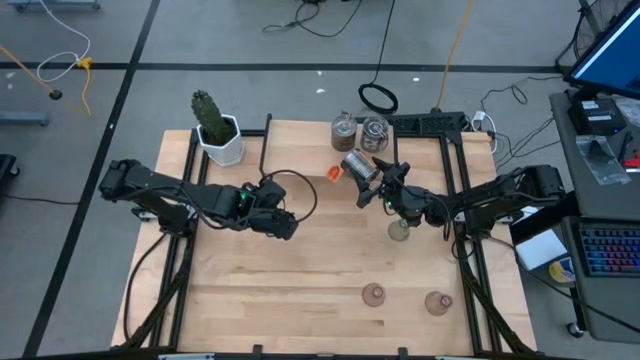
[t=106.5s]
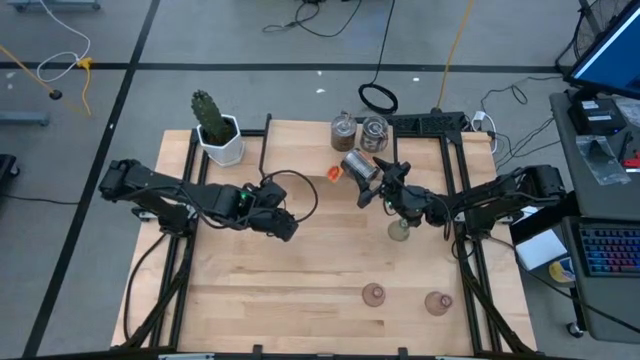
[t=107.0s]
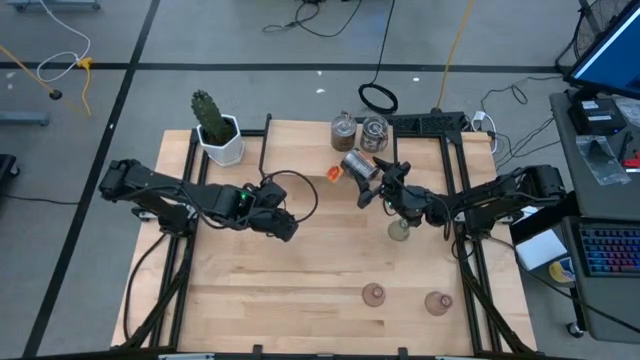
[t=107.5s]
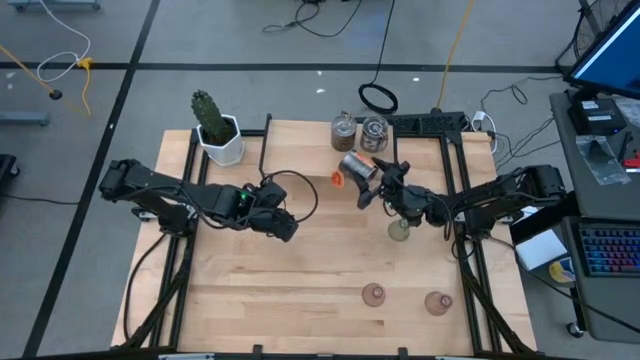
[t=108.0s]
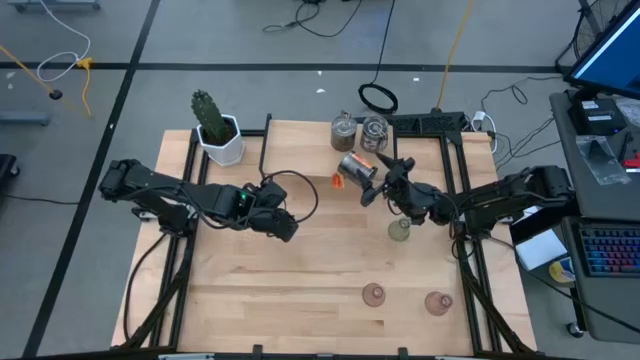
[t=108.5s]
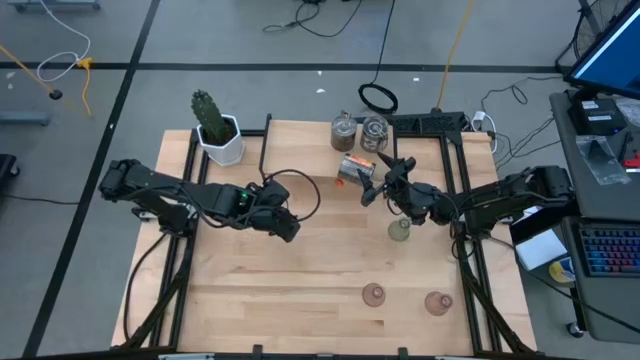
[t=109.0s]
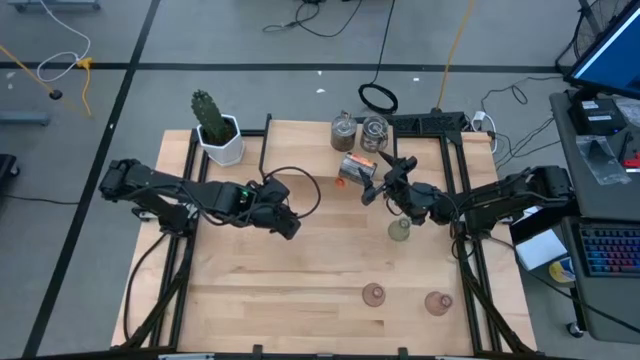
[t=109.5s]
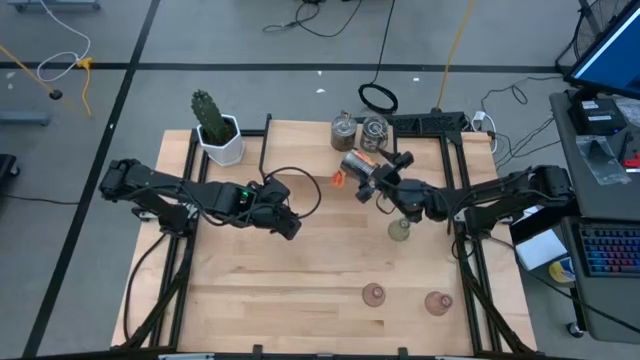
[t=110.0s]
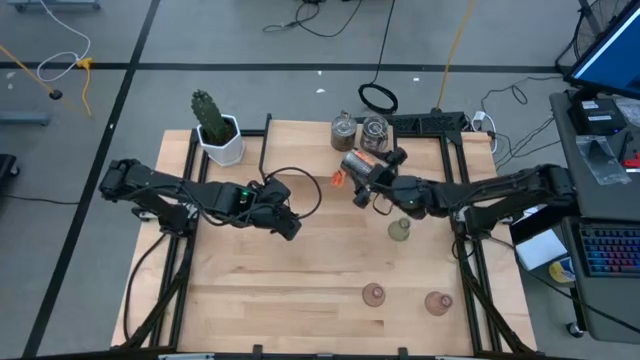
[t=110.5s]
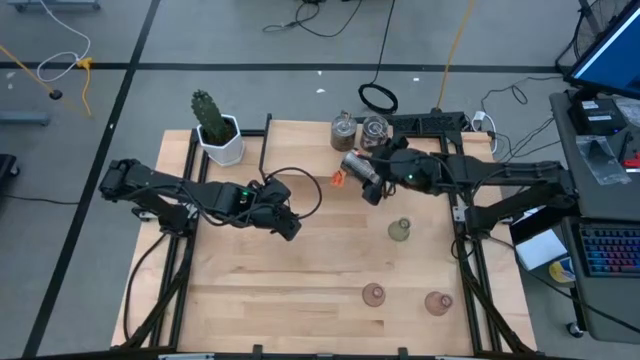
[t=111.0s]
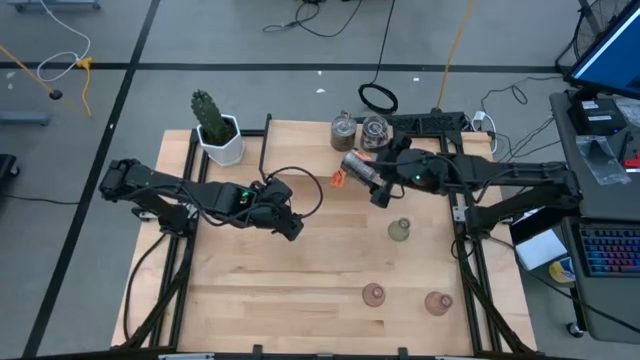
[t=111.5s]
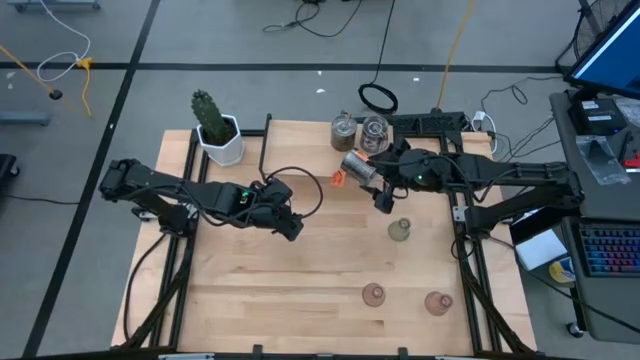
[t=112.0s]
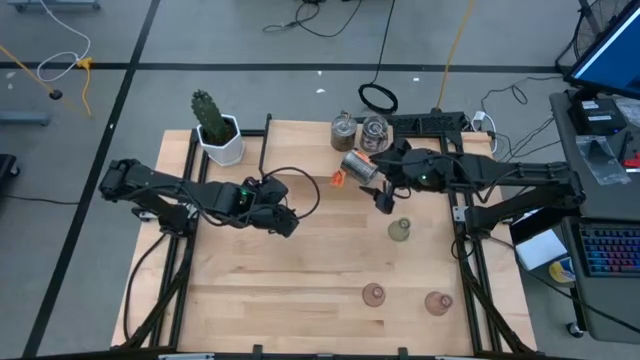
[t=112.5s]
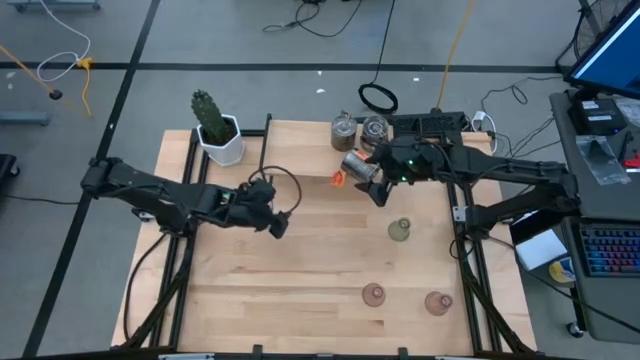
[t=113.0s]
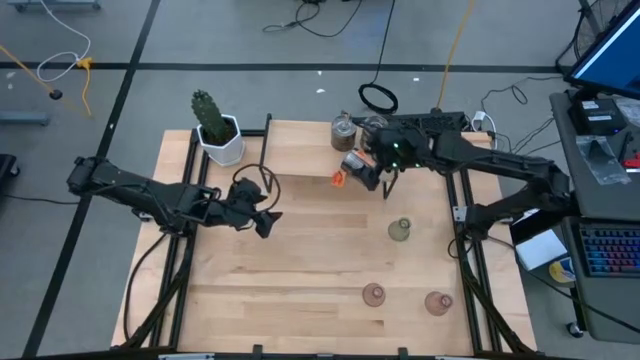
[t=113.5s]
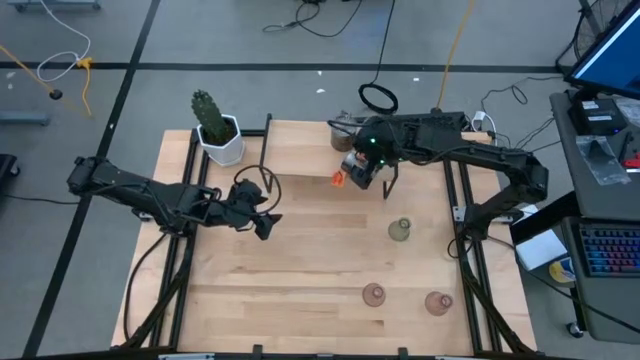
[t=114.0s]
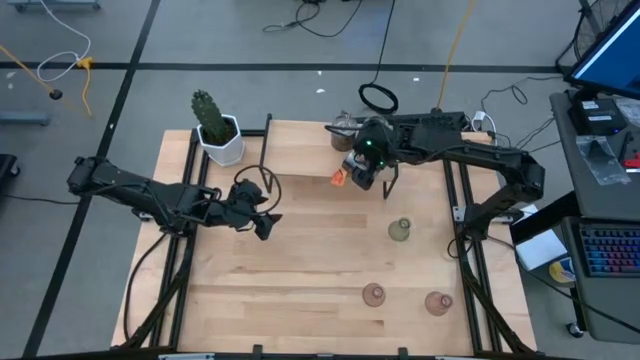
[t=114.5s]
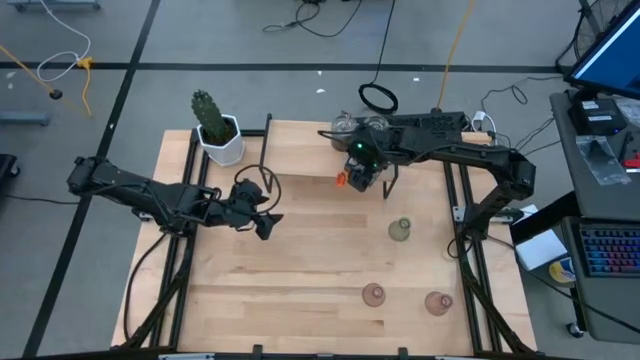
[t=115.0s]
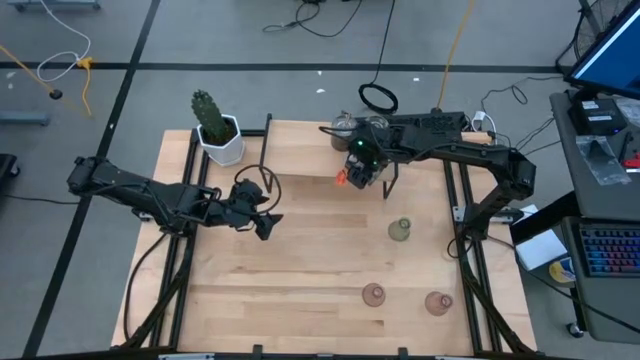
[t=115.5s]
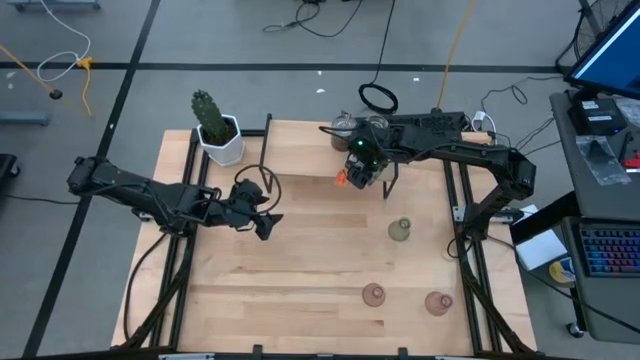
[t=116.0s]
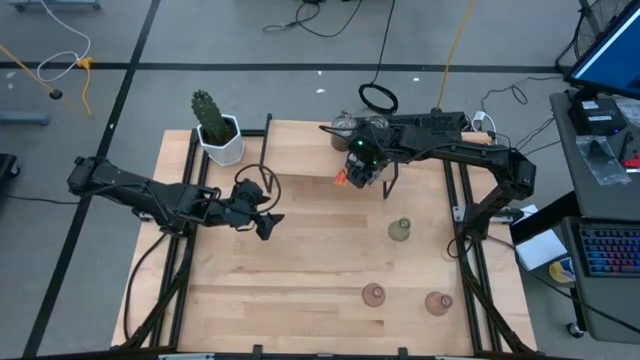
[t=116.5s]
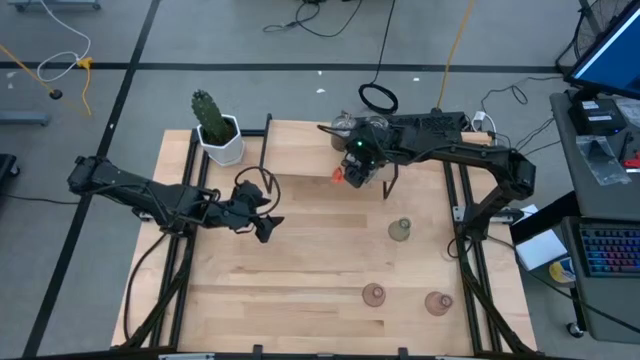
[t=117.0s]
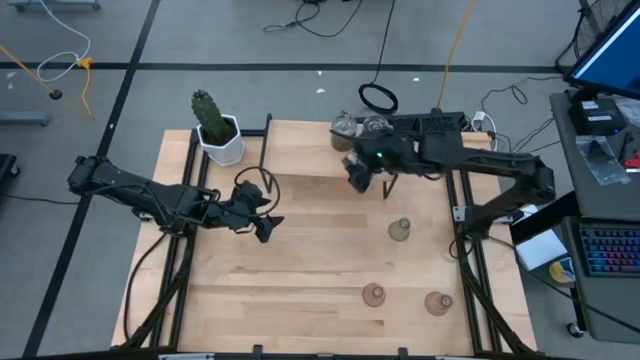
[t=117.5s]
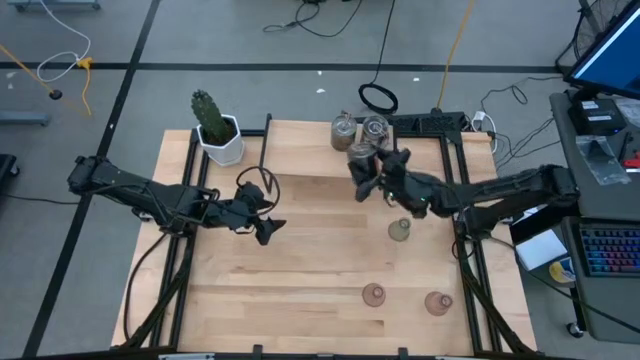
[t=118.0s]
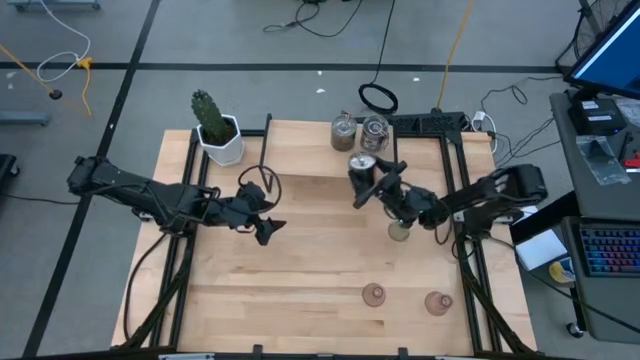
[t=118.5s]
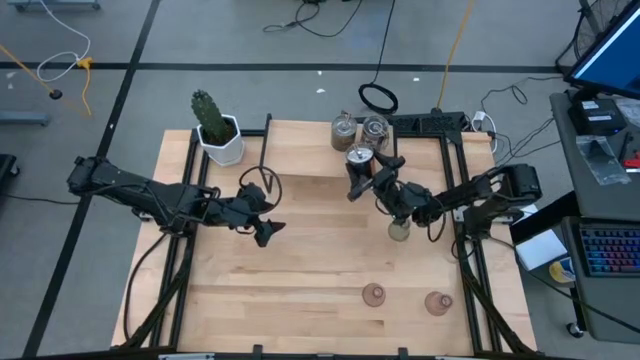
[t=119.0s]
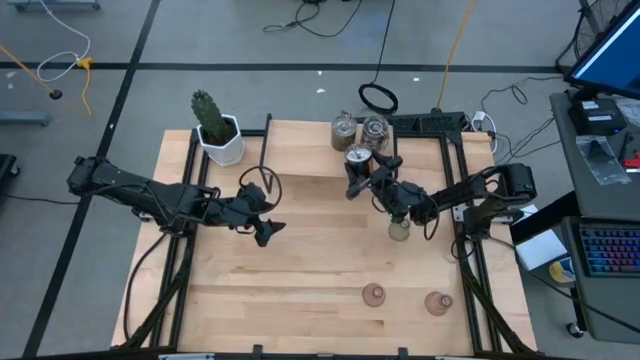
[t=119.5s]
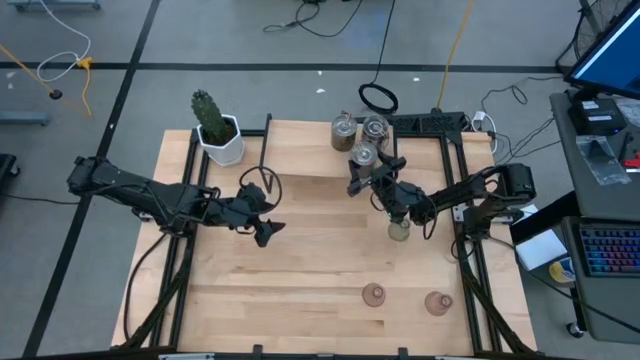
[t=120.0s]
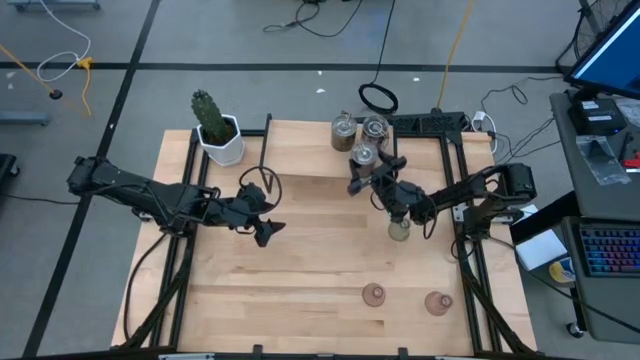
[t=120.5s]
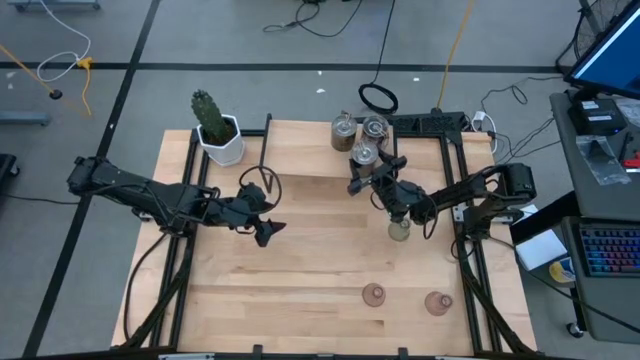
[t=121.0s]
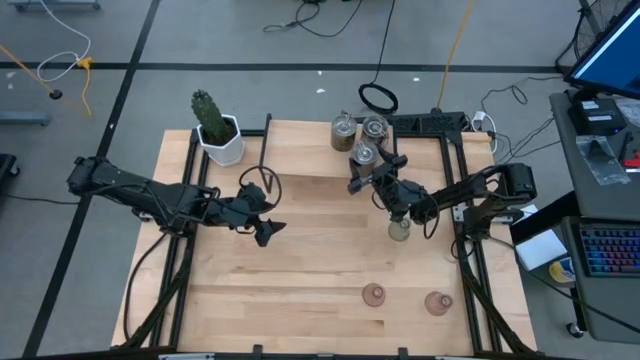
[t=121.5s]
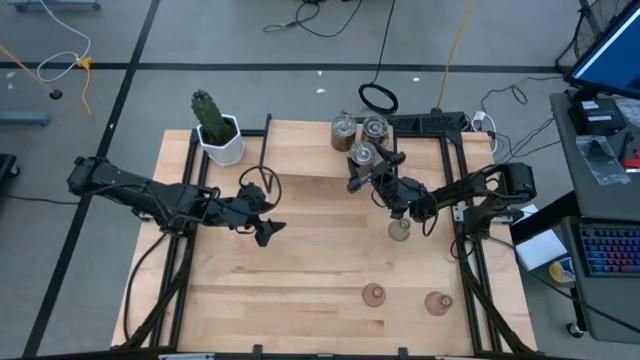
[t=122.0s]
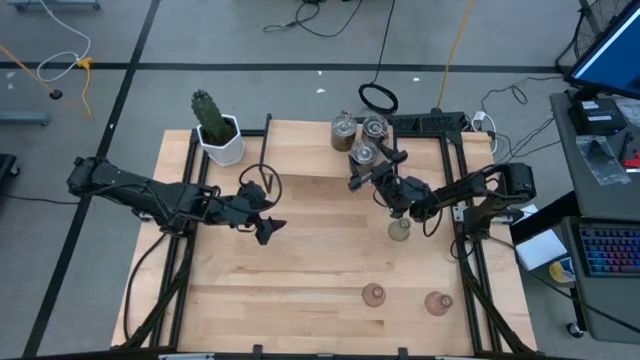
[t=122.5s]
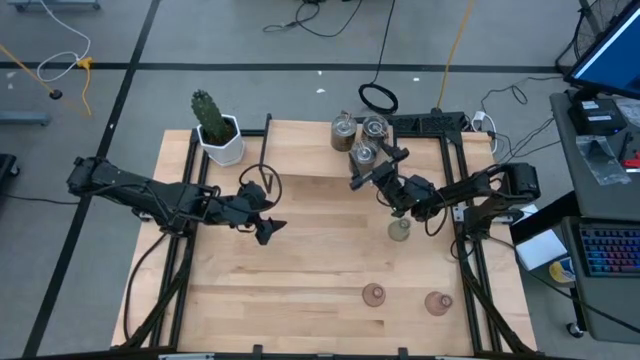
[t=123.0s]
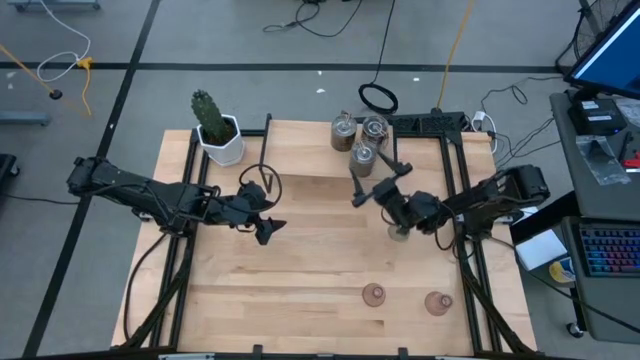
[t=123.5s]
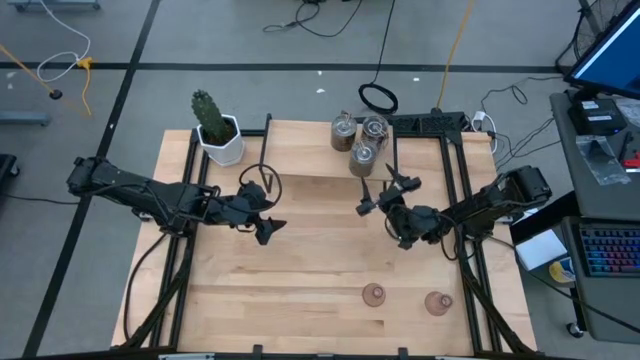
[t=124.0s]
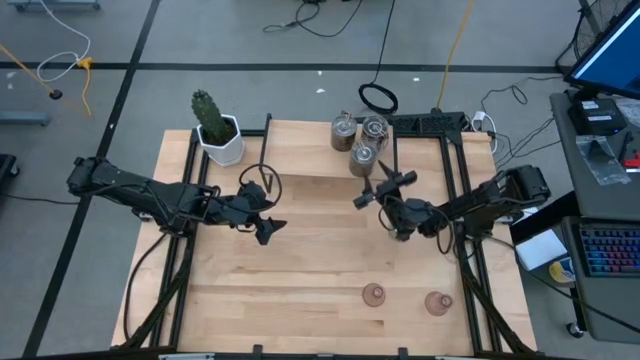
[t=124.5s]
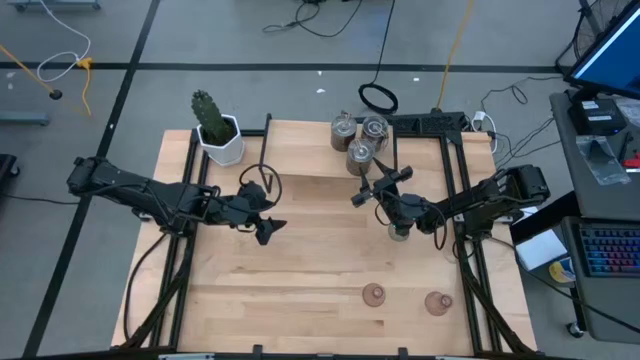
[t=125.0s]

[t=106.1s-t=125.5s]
Task: Pick & Place candle stick holders
Put the silver scented candle on the shelf

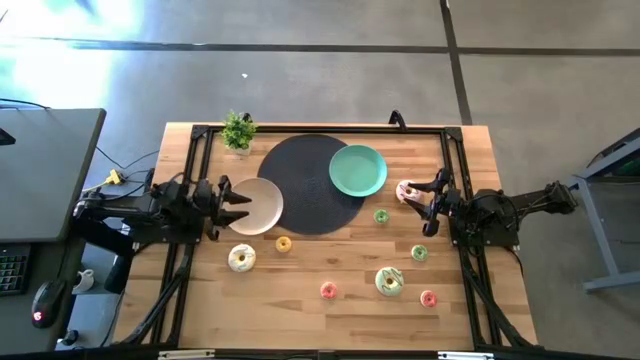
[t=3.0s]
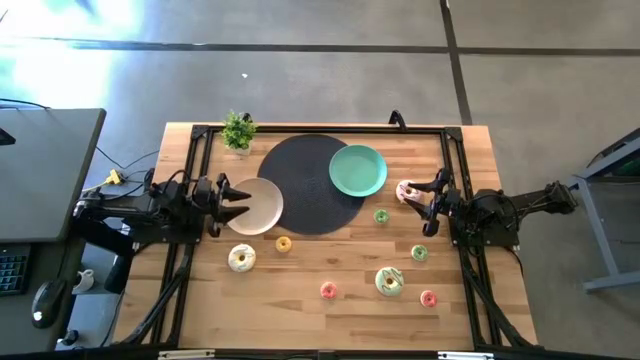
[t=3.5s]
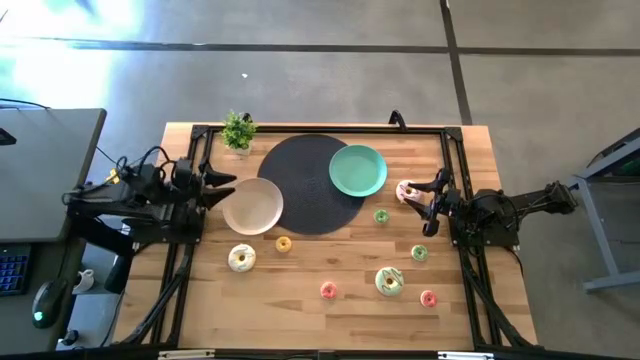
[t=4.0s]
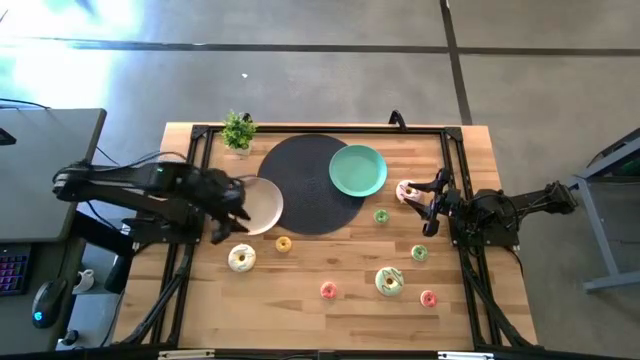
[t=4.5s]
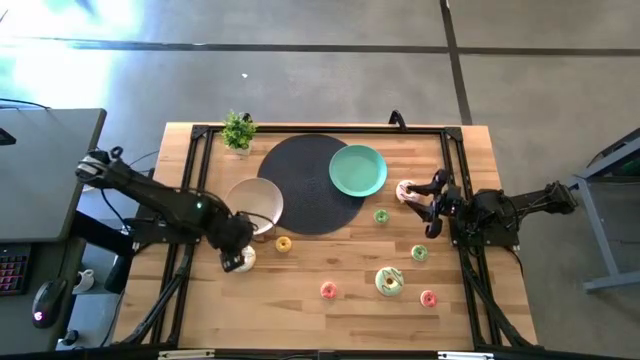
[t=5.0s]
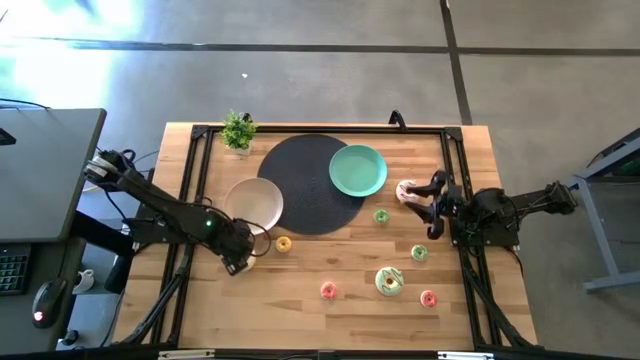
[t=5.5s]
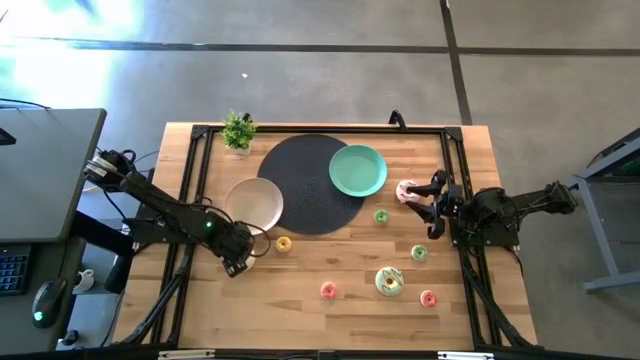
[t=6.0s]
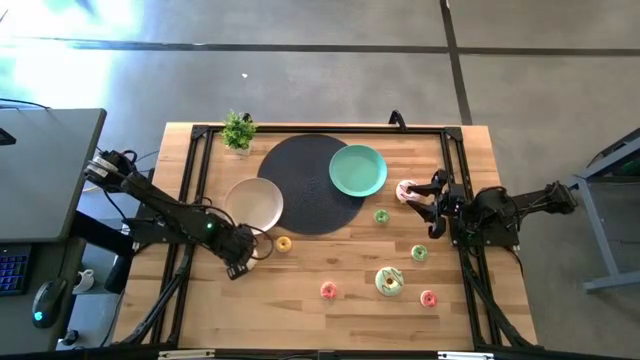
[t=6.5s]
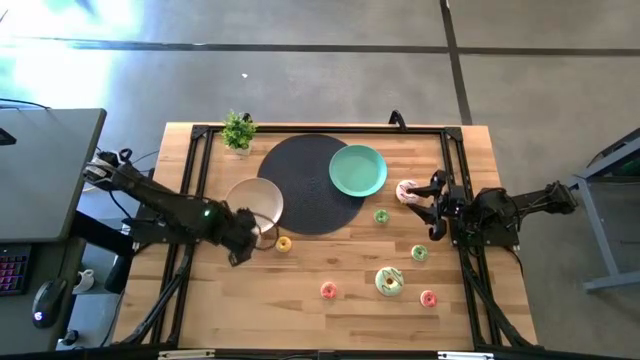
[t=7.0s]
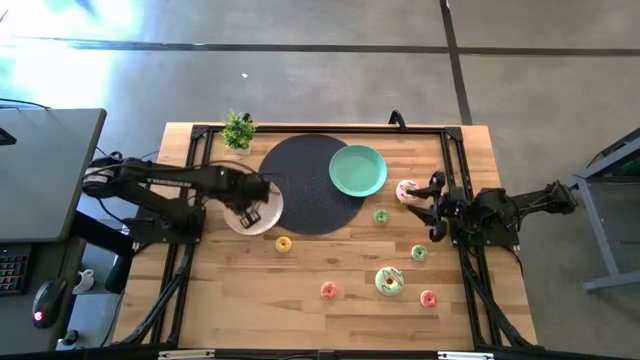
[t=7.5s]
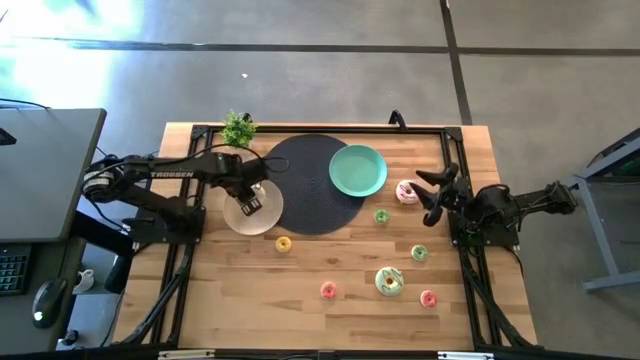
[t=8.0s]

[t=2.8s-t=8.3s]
Task: Pick & Place donuts
Put the large white donut on the brown plate
